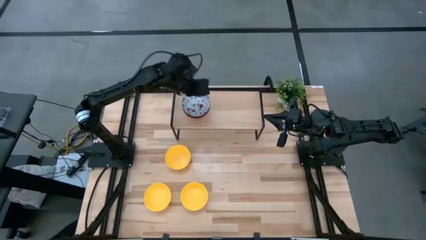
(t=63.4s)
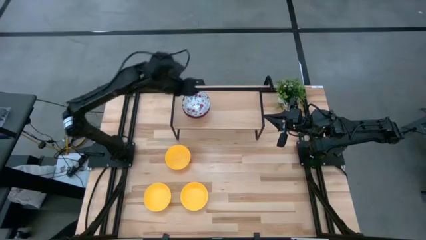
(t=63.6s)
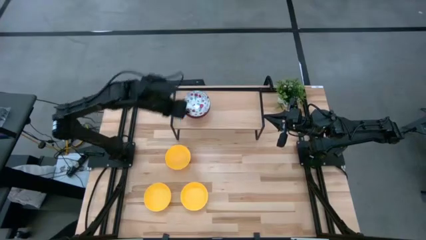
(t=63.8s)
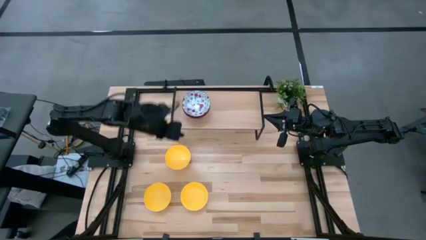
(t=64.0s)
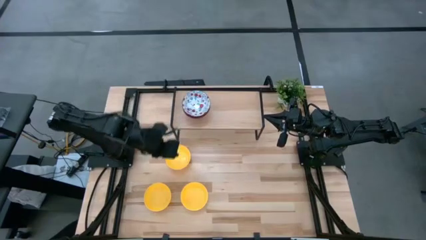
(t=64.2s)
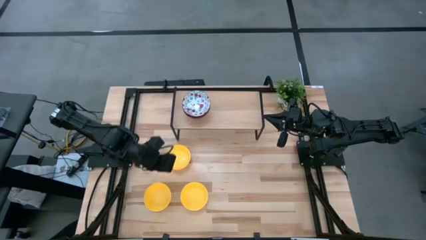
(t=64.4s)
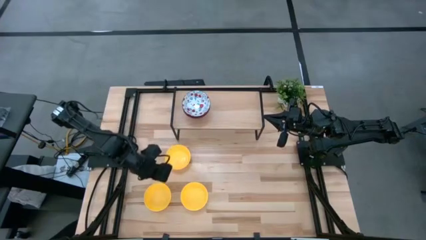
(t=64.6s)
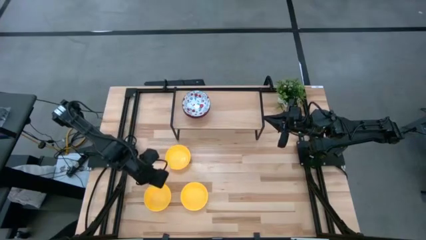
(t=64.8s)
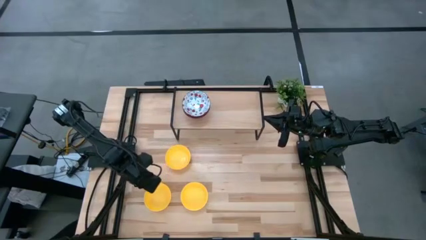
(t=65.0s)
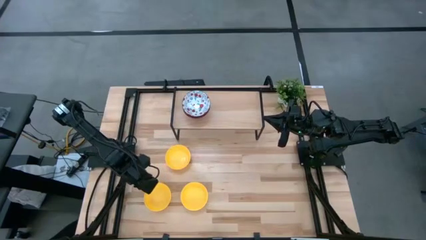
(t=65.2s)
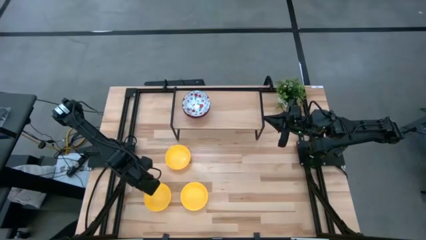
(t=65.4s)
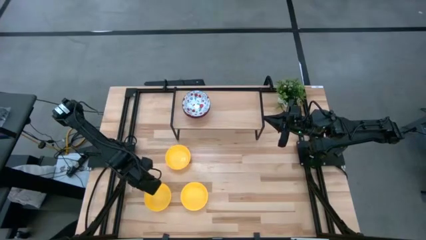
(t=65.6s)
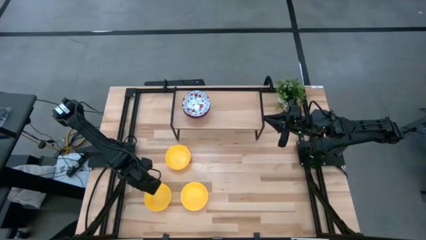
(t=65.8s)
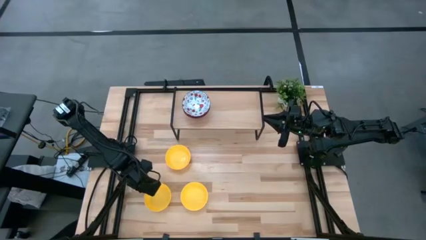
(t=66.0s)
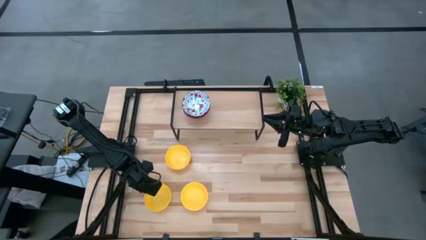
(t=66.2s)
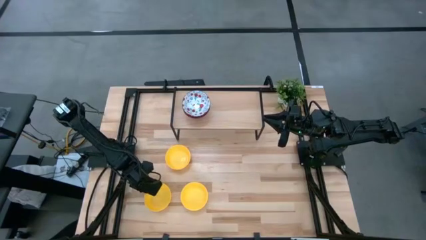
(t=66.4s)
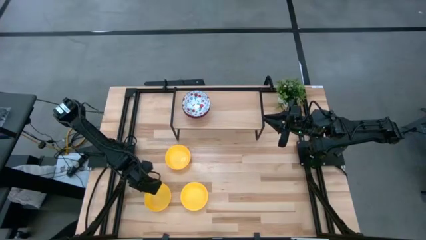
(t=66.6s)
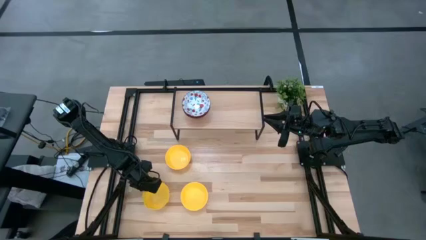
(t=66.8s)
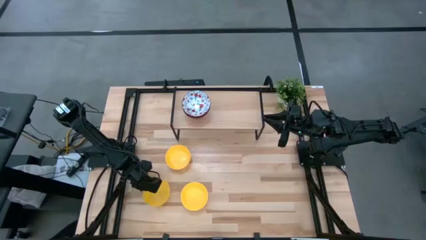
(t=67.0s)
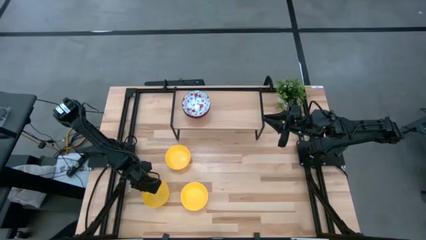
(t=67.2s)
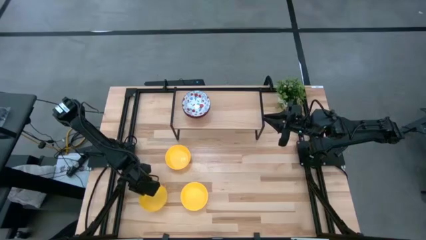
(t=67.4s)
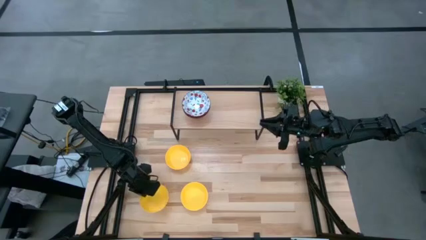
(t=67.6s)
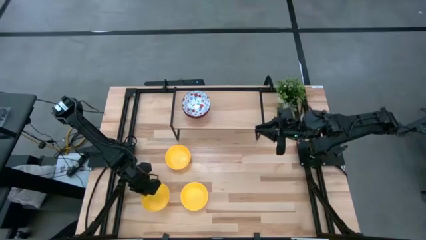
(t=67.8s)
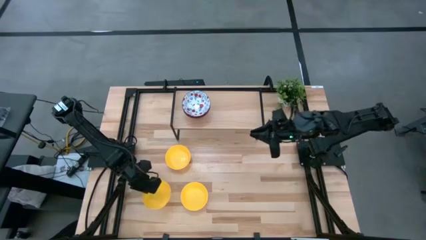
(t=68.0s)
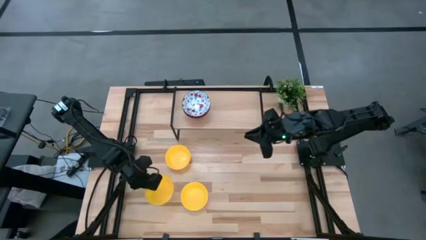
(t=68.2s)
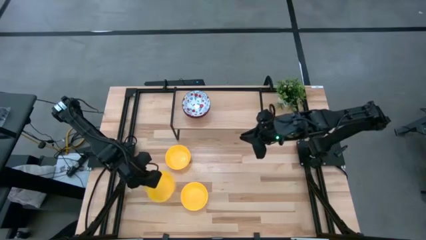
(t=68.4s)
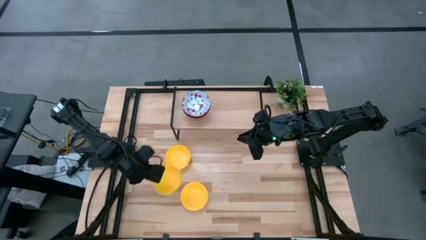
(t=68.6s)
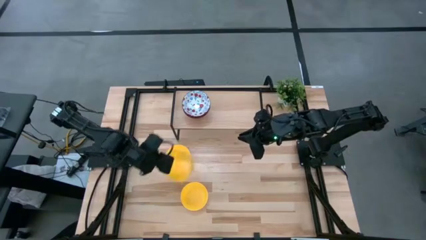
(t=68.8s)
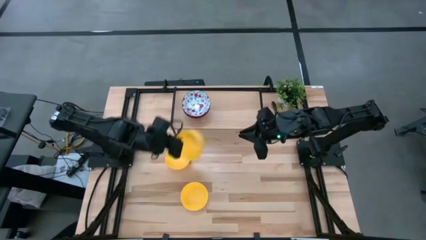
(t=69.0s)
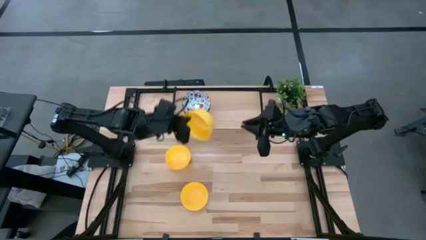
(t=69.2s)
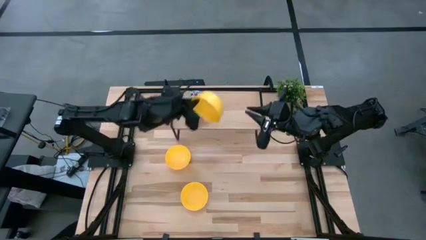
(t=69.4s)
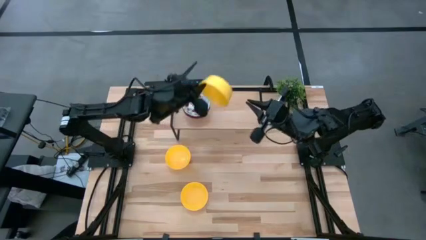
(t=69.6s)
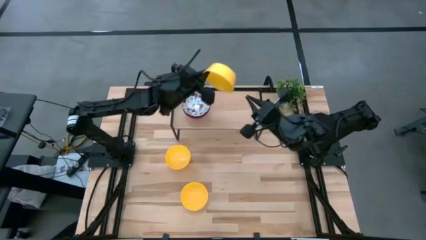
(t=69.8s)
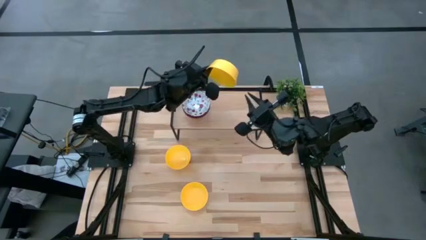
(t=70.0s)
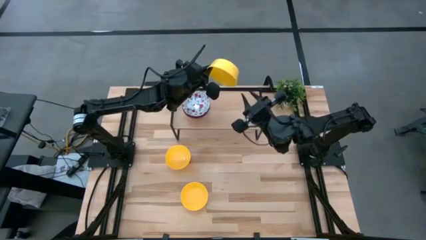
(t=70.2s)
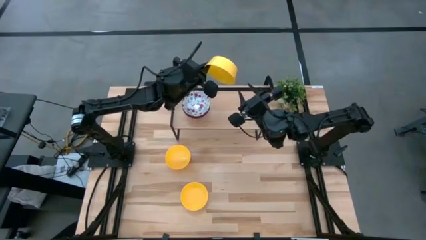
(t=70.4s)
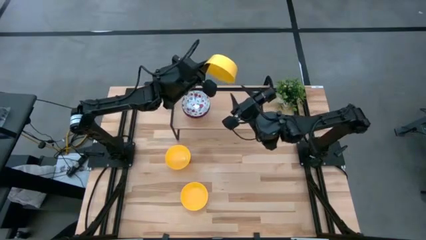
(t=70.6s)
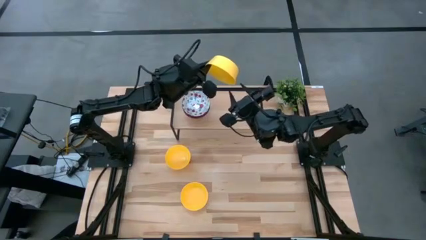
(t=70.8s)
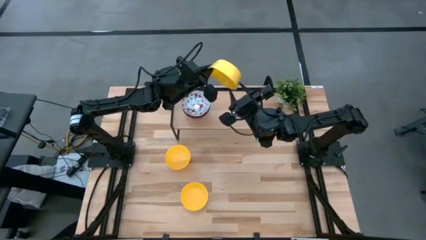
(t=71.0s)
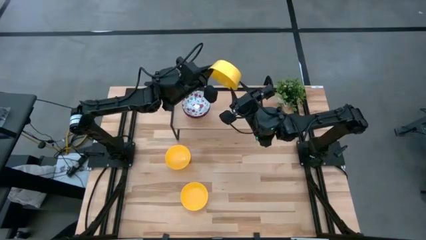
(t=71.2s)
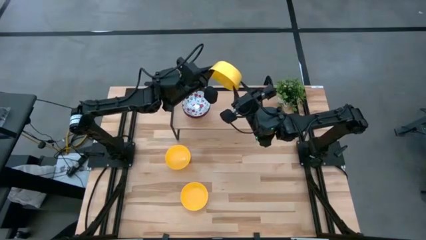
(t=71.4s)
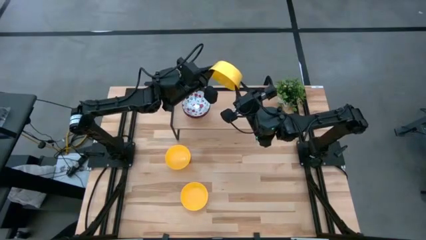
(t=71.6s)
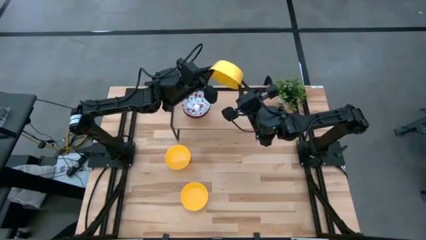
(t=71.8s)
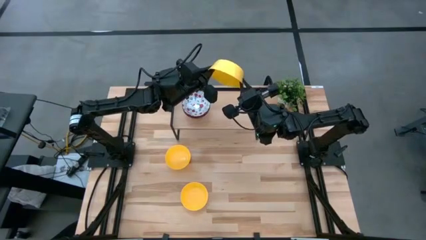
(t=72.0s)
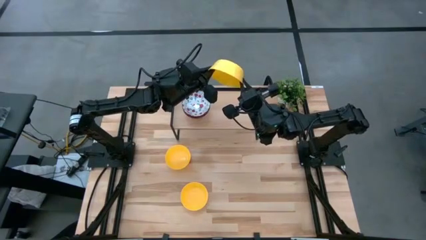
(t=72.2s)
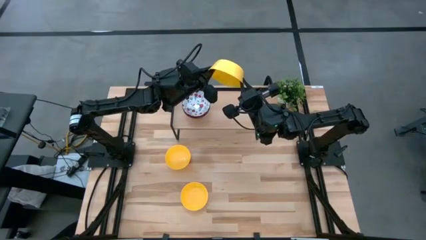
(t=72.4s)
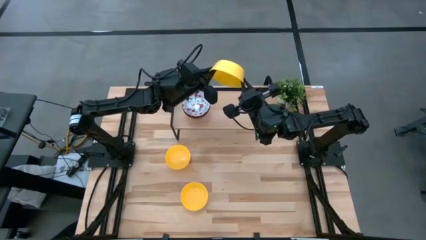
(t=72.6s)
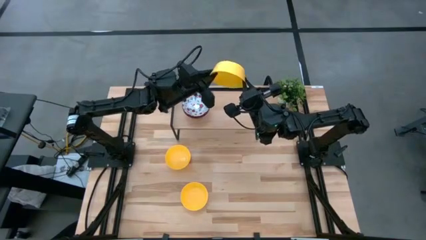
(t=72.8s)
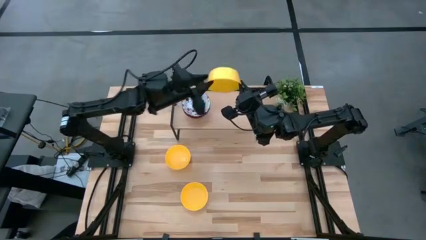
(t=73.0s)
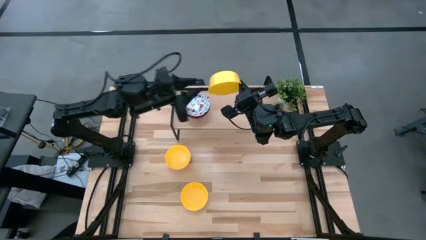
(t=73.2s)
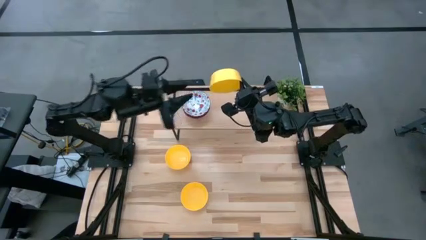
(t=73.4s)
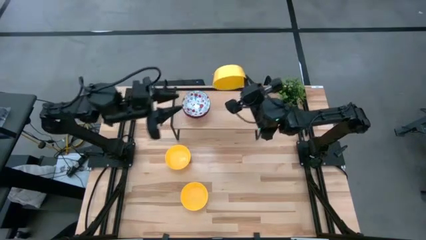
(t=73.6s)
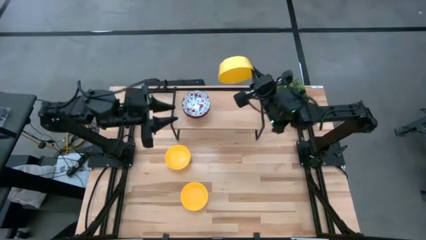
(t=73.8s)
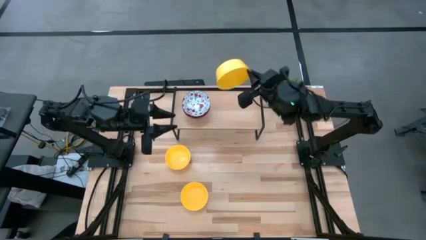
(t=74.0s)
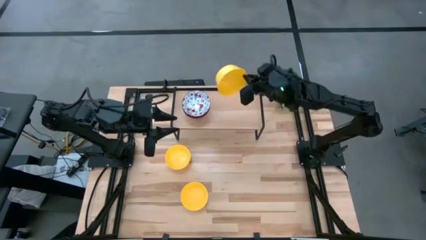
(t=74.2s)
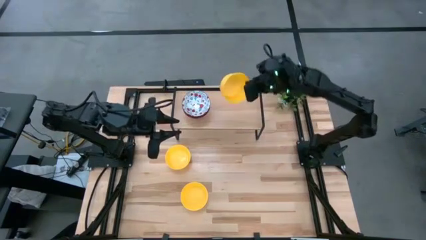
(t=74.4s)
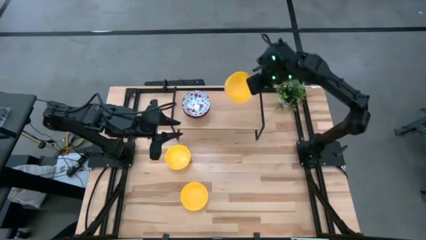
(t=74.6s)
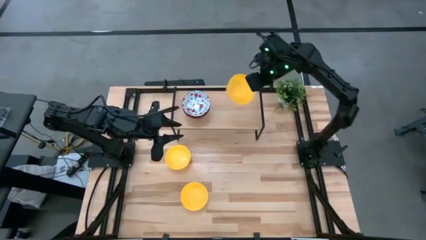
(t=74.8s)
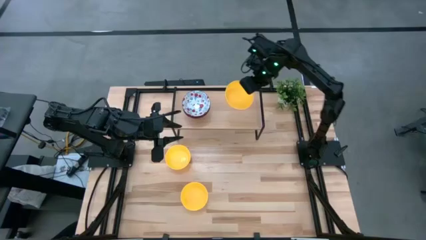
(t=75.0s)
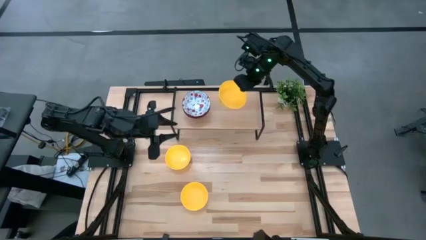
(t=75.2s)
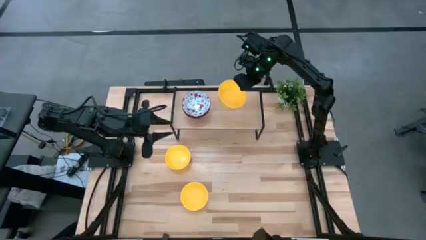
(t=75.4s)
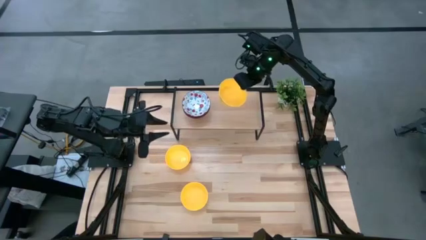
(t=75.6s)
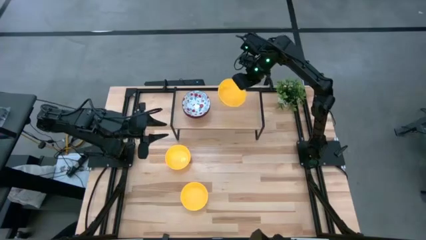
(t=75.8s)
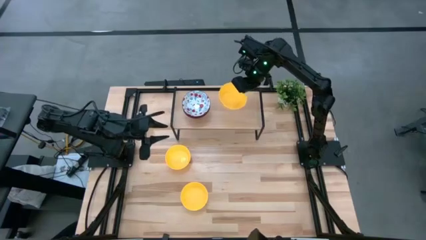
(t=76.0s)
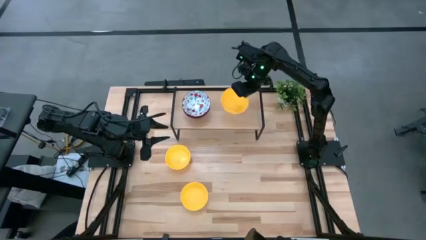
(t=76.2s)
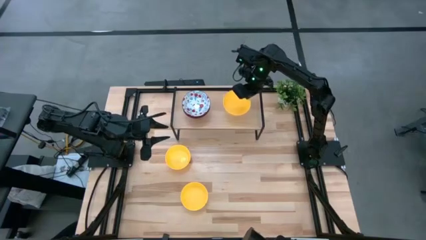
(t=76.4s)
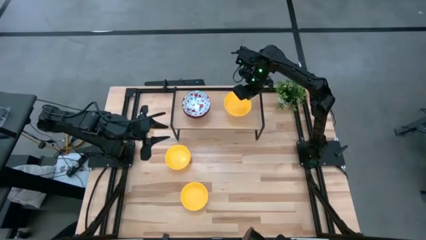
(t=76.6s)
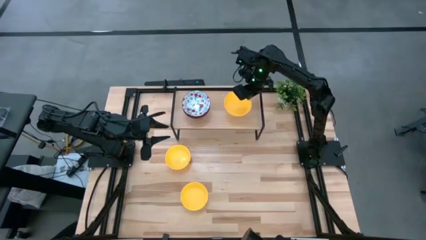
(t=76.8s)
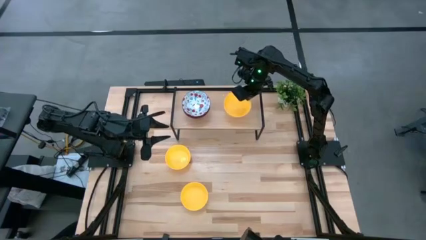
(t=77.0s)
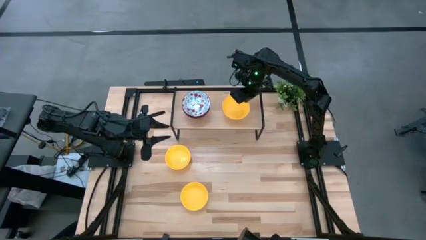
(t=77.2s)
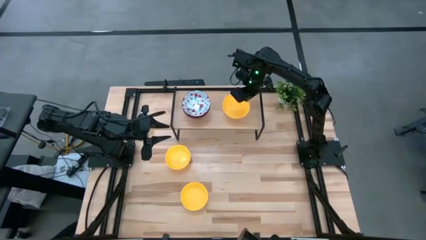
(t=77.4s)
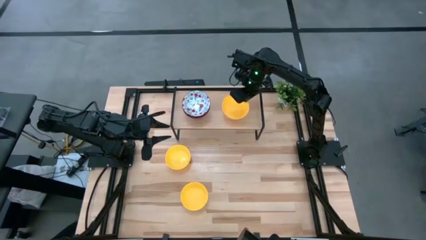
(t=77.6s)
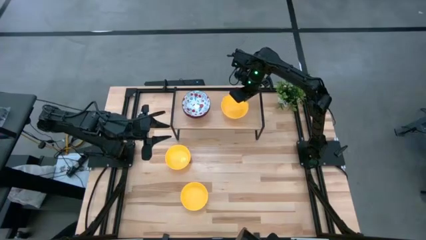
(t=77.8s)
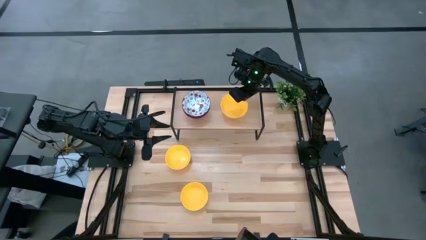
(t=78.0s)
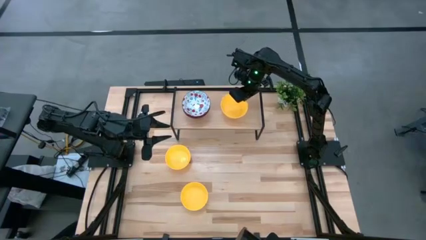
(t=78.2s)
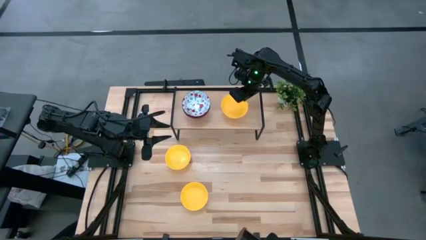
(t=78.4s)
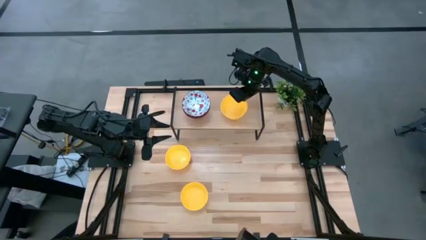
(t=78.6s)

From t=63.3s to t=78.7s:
Task: Pick & Place Mini bowls
Put the bottom left yellow bowl on the shelf
